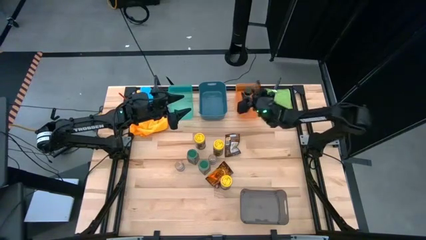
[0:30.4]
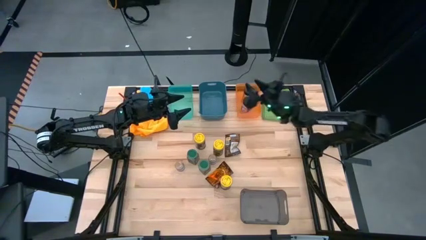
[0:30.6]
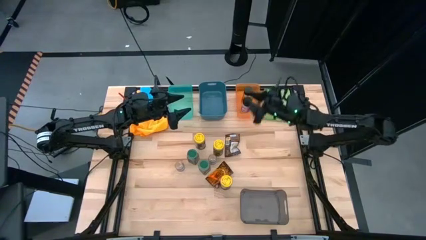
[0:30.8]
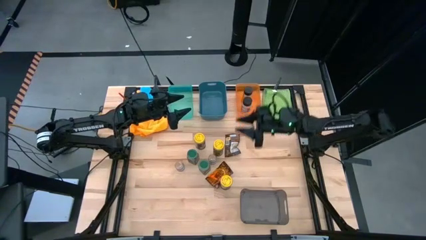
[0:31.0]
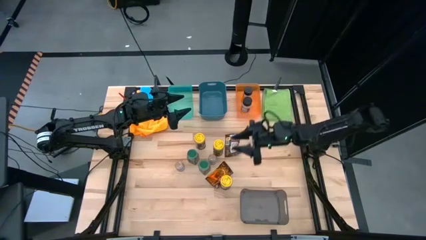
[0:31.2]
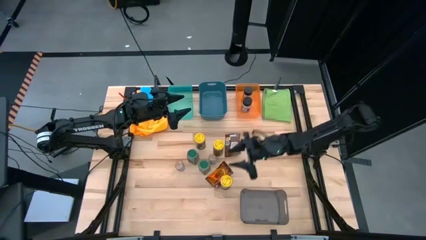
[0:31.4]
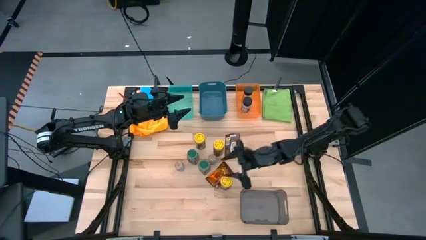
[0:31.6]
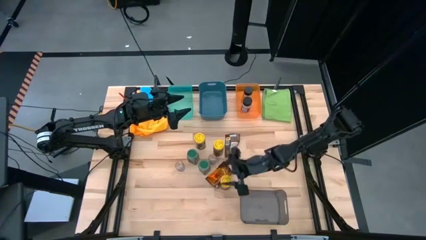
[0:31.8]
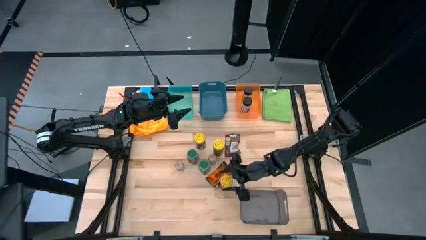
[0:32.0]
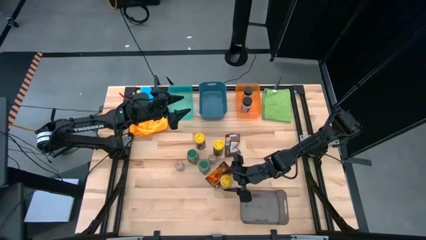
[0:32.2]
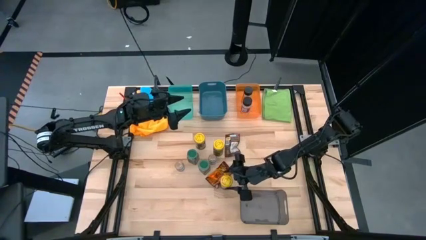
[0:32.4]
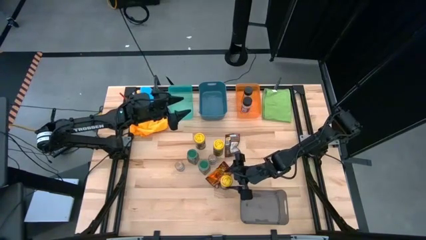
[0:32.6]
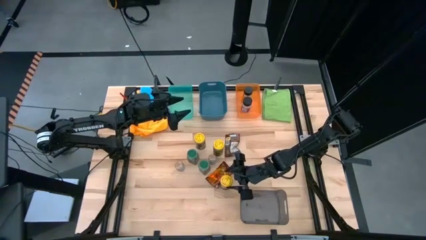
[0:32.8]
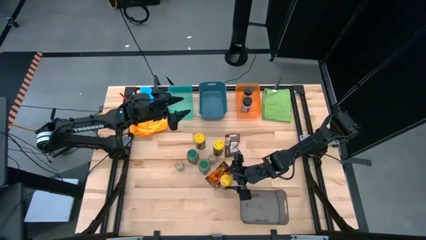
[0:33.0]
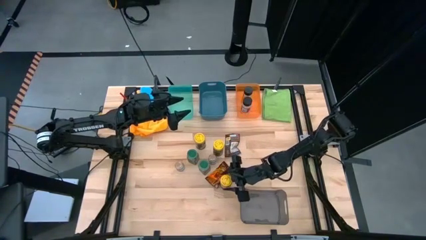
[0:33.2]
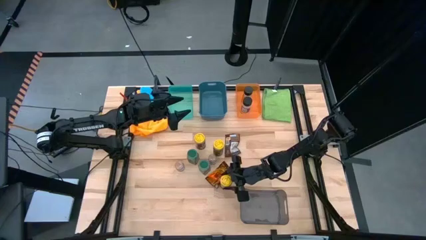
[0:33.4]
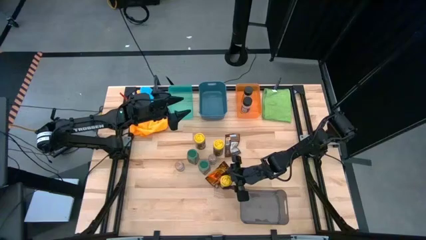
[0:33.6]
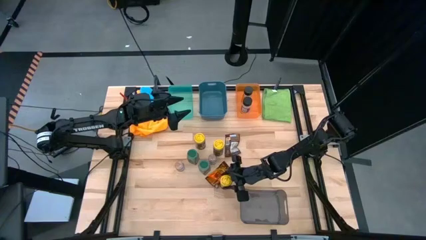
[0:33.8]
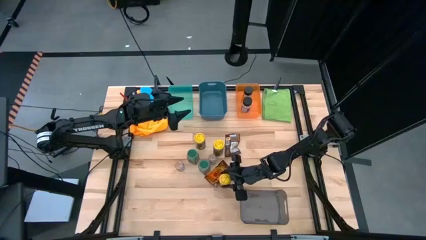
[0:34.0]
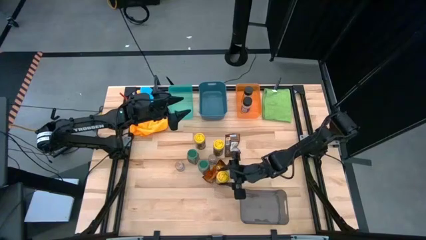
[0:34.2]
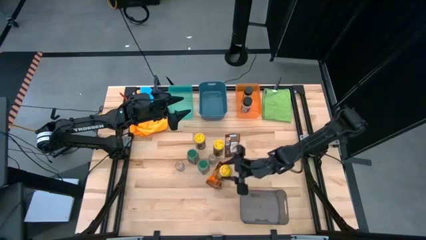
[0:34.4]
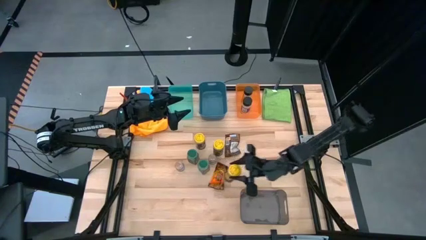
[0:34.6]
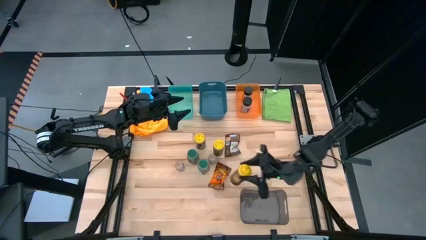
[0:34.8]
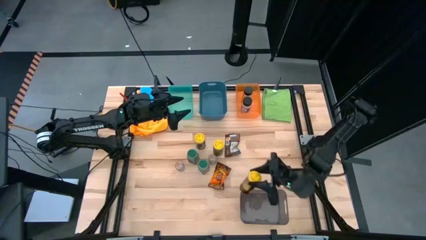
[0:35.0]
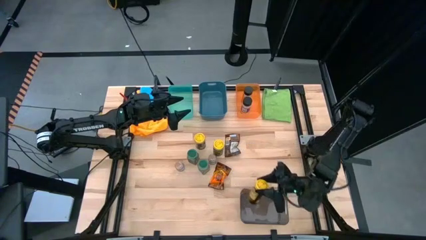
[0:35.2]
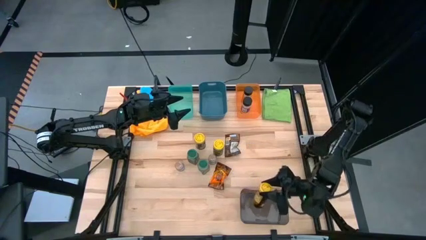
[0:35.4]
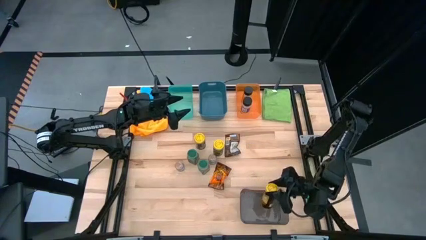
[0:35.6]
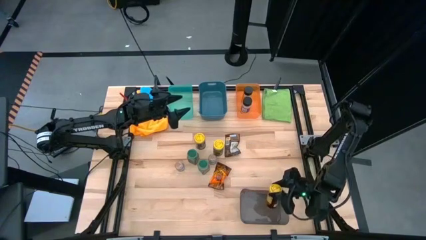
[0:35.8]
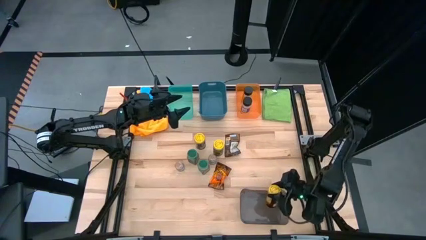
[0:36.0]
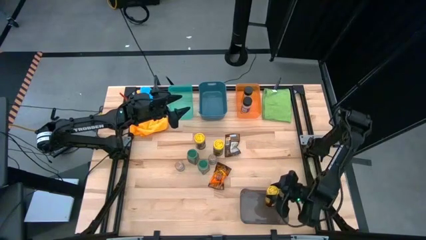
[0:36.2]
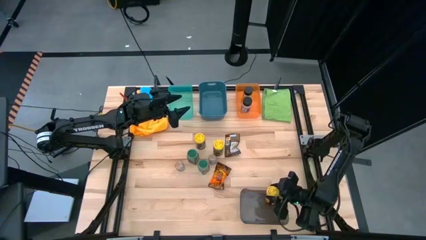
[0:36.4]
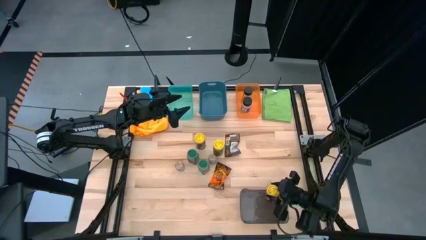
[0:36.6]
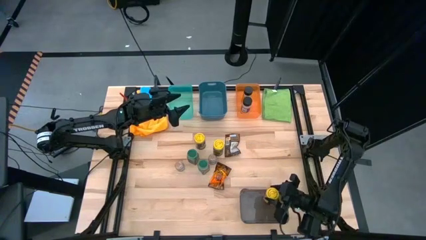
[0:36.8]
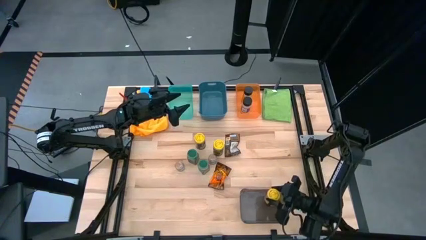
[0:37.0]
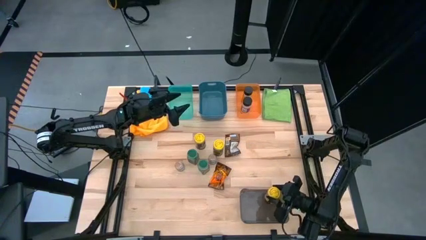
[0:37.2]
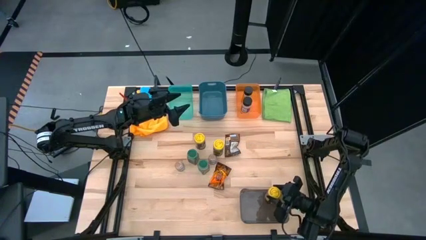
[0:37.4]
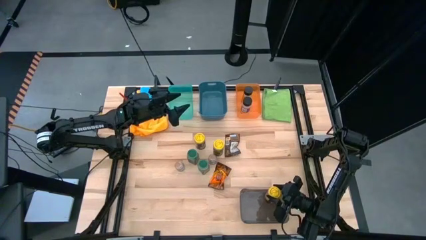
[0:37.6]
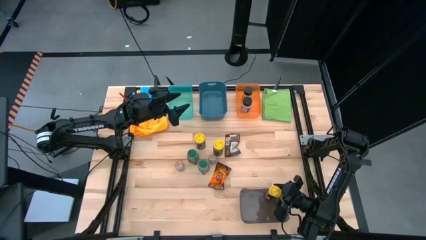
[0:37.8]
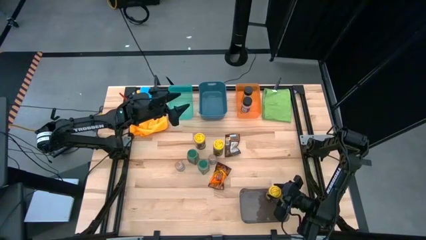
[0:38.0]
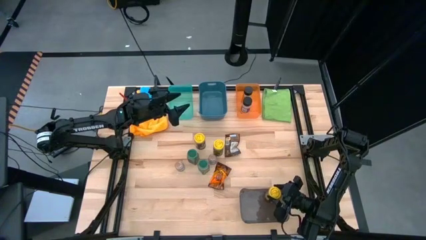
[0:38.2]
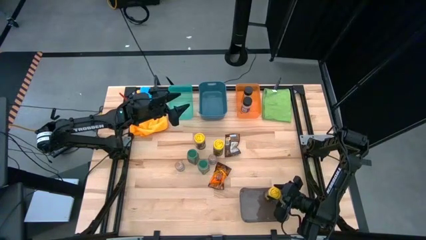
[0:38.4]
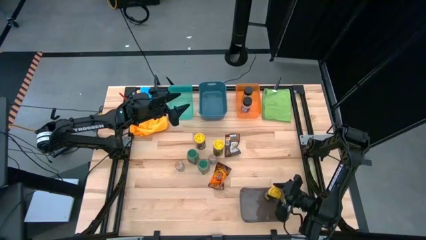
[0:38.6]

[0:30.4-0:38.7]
Task: Sort spices by type
Put the bottom yellow seasoning can into the black bin

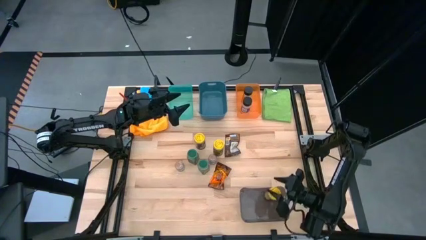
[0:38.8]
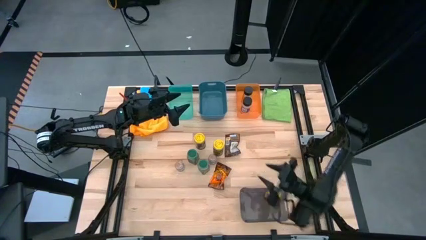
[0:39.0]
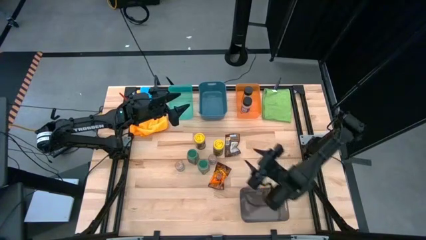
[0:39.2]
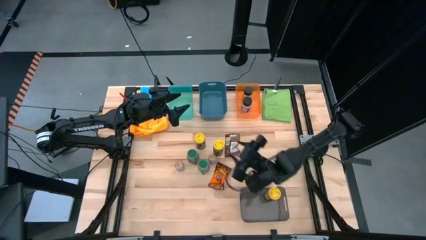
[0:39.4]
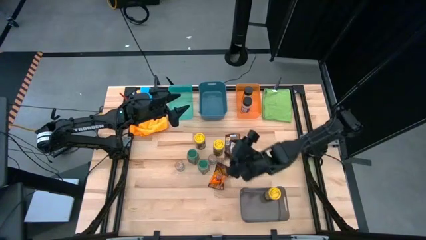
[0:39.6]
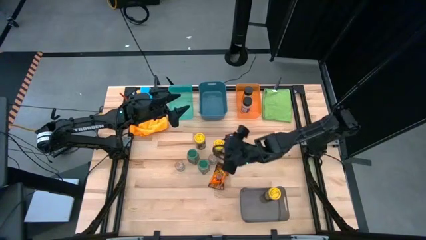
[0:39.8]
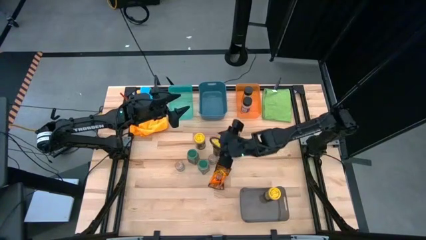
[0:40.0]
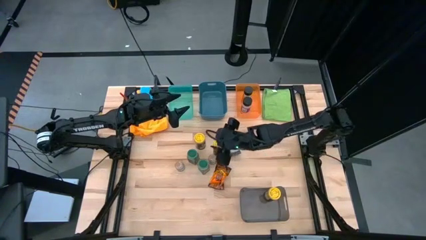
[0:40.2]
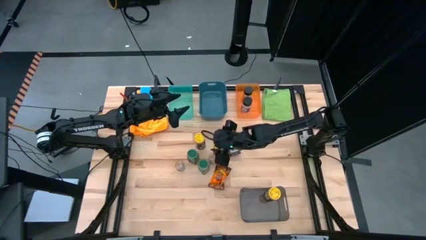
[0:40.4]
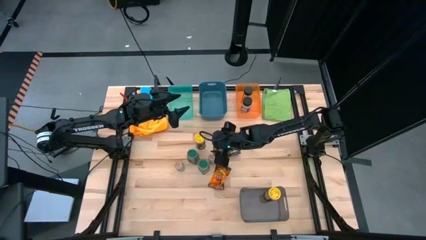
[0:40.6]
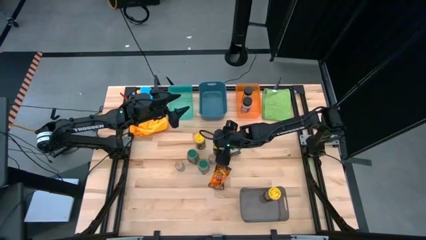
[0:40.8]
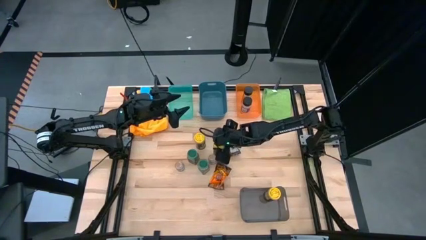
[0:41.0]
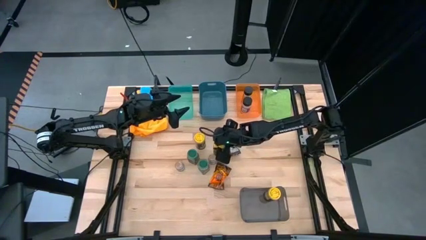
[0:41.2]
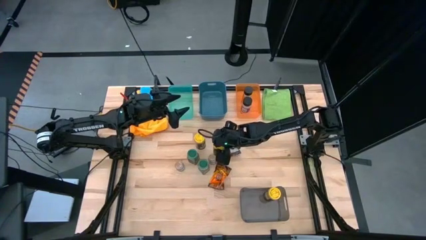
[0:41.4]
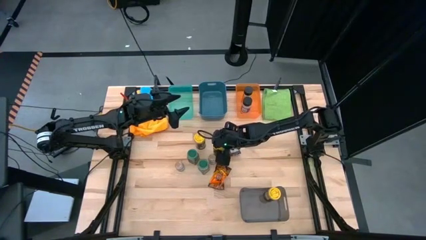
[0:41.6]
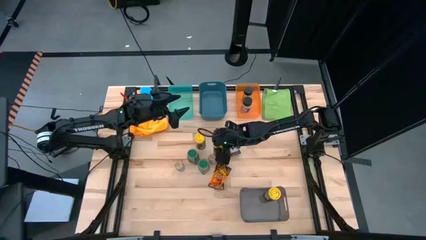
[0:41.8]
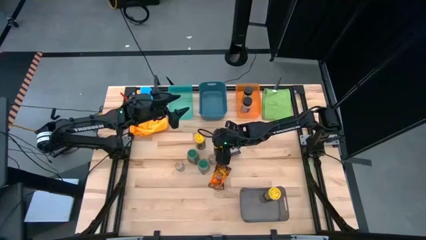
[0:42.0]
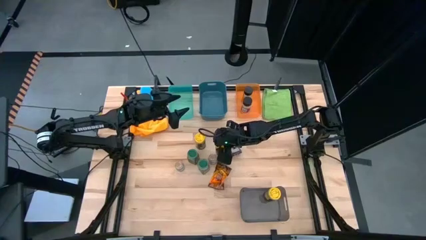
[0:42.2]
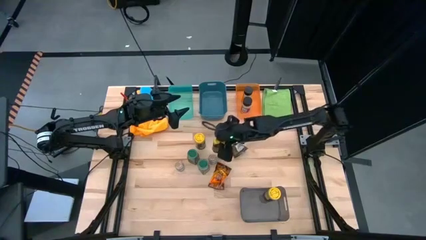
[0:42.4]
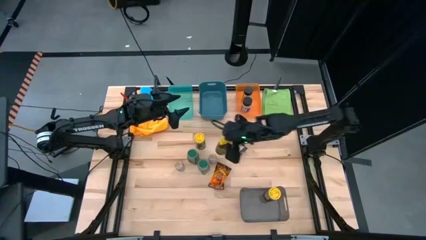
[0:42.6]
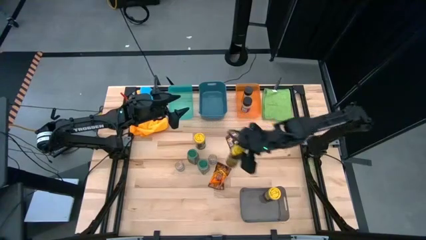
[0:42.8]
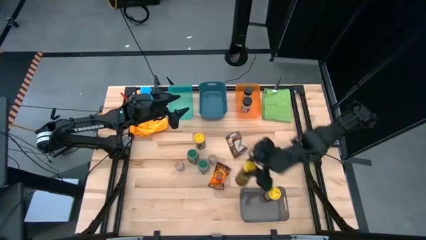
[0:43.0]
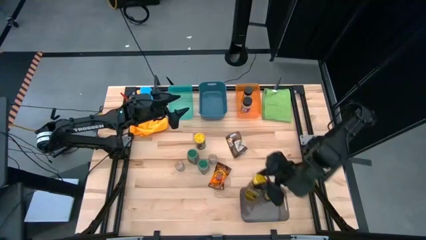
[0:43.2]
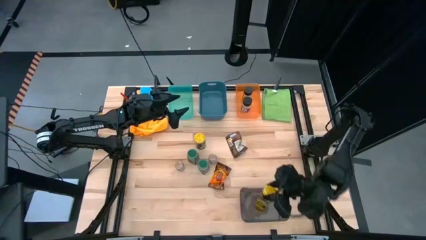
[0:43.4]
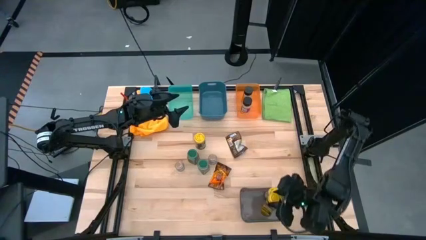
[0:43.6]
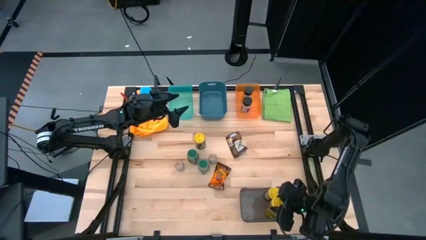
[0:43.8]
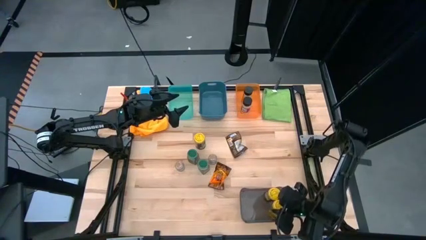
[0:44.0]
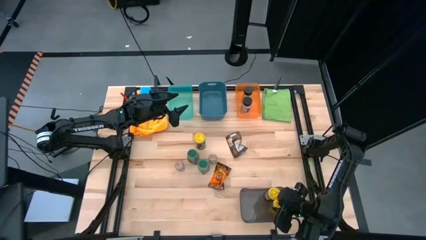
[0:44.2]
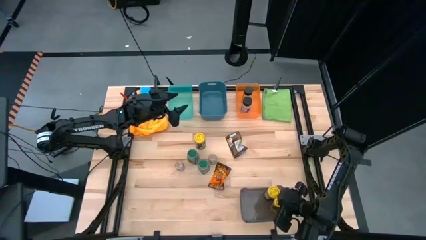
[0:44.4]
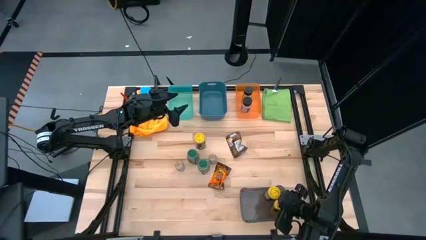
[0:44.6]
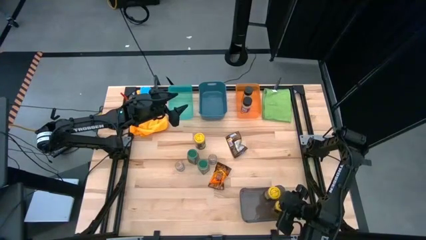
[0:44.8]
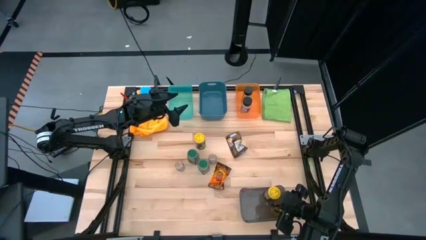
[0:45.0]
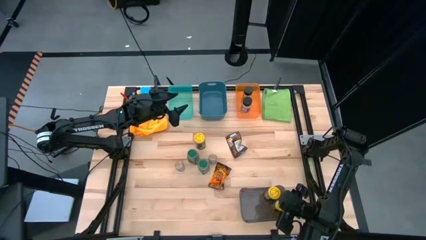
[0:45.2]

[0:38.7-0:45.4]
Put the right yellow seasoning can into the black bin

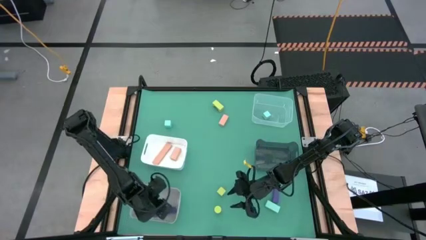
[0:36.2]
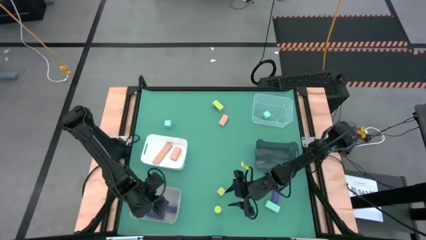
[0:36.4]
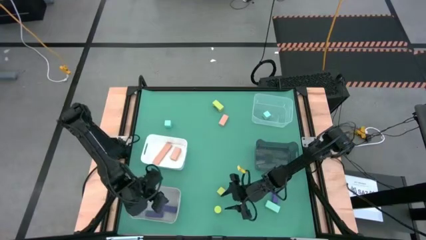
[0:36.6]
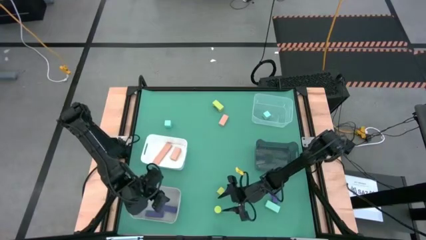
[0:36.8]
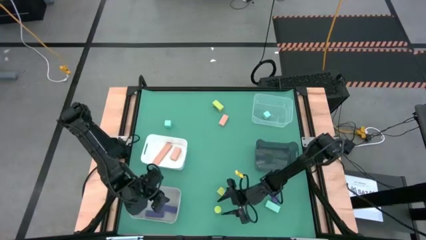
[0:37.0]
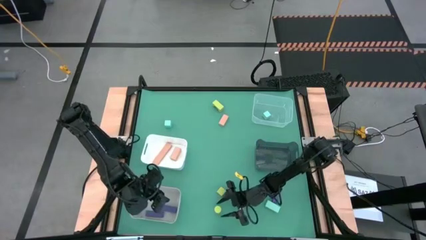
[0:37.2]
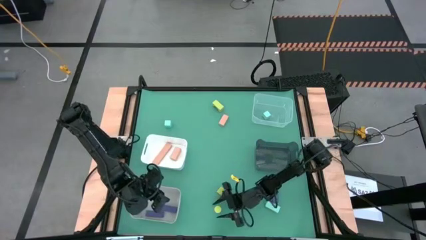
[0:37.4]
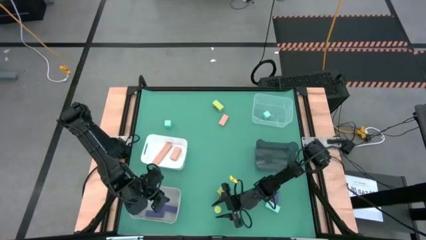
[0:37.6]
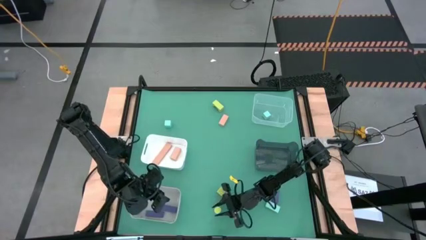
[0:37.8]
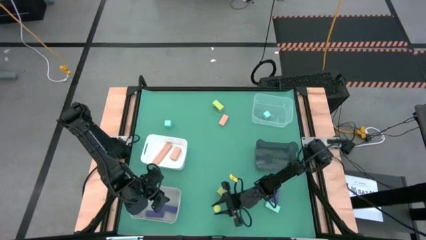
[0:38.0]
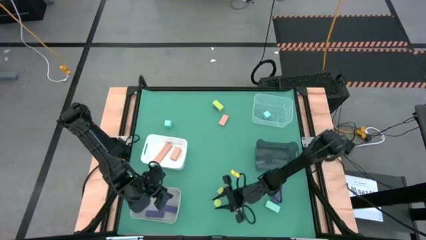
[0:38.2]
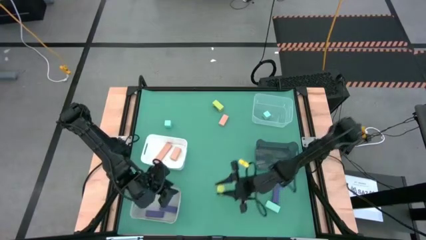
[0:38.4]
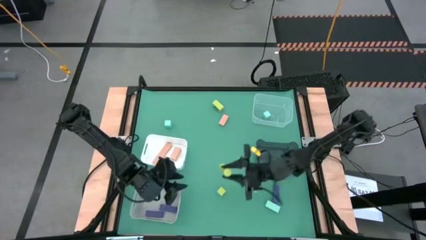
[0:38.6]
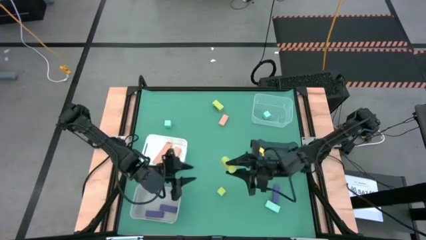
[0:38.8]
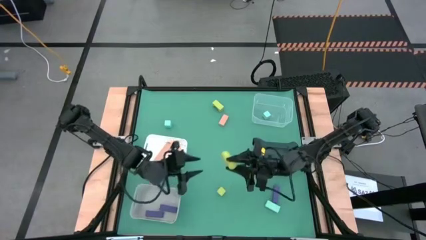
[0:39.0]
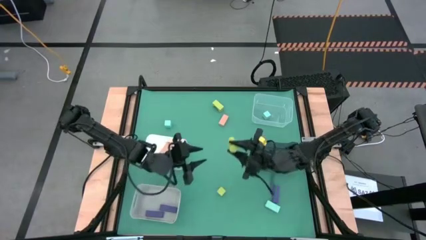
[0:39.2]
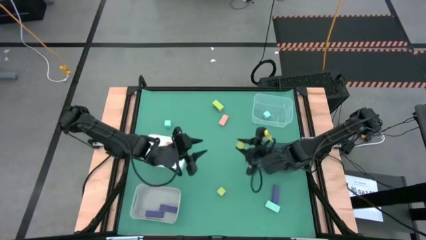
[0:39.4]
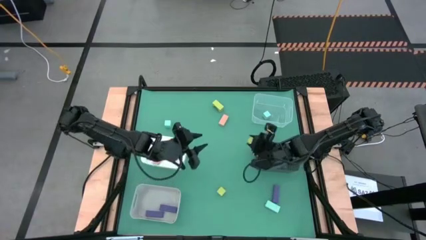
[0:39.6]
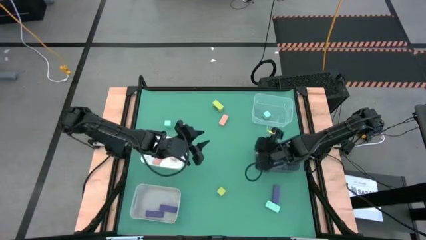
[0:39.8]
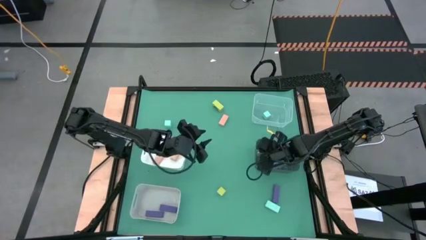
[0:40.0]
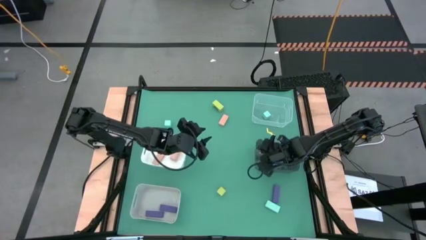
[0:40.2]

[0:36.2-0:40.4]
Task: Sort & place blocks by color
Put the bottom green block into the black bin
